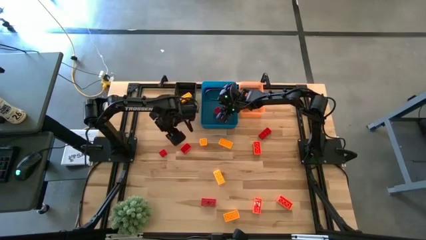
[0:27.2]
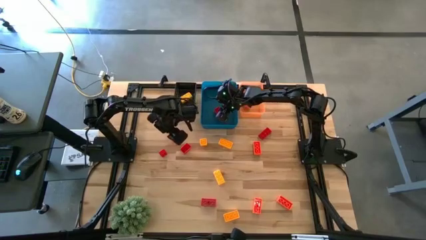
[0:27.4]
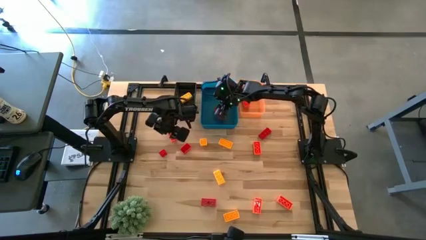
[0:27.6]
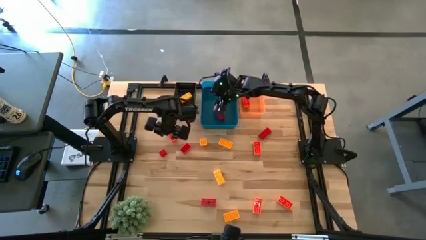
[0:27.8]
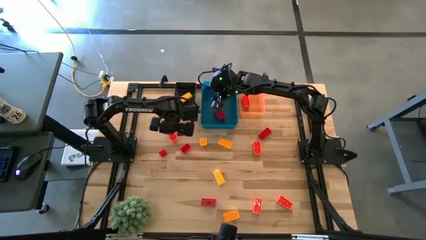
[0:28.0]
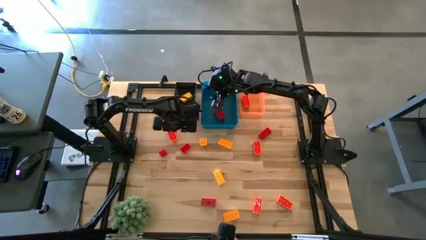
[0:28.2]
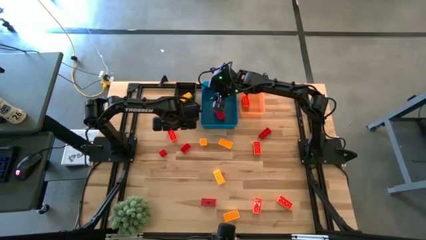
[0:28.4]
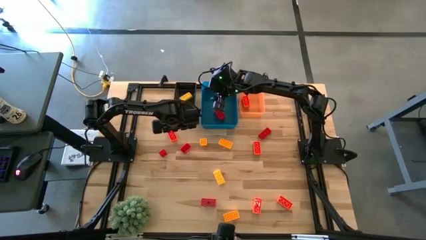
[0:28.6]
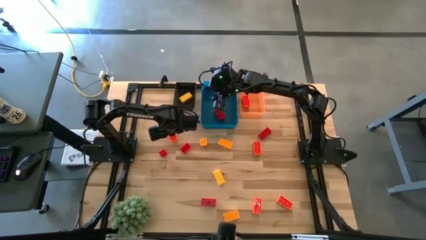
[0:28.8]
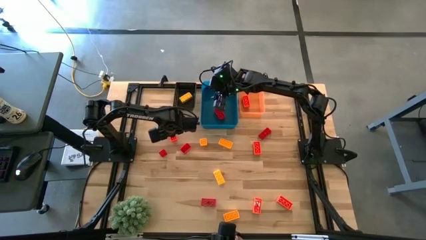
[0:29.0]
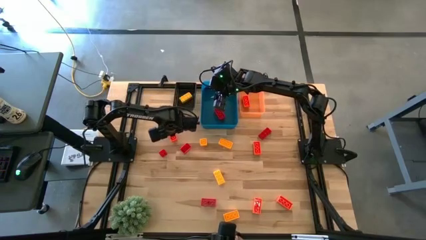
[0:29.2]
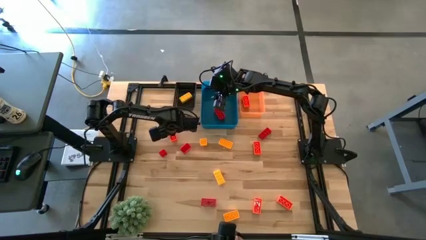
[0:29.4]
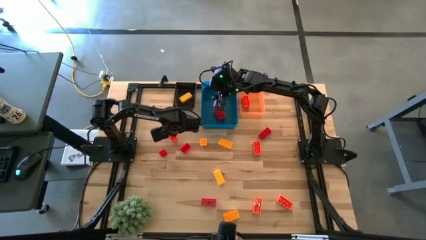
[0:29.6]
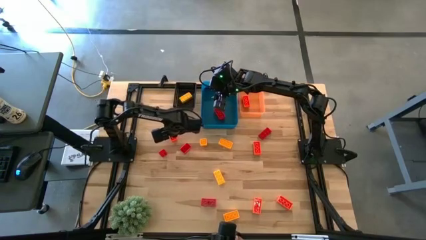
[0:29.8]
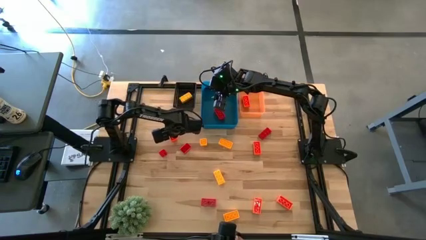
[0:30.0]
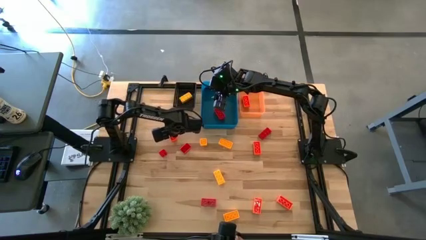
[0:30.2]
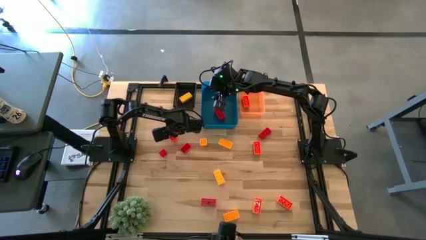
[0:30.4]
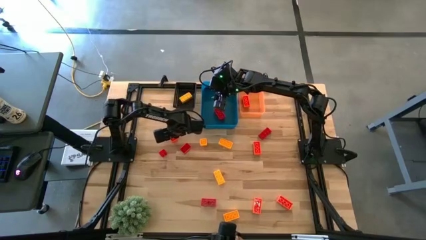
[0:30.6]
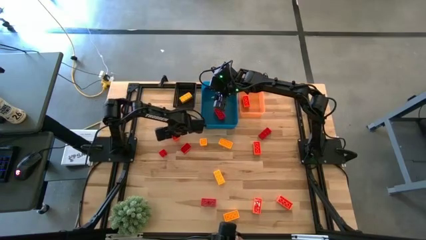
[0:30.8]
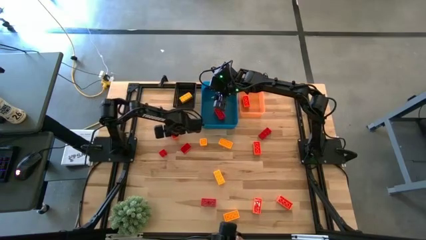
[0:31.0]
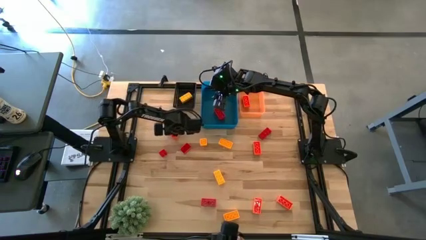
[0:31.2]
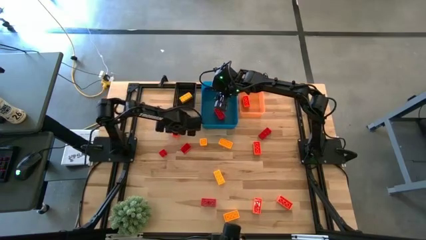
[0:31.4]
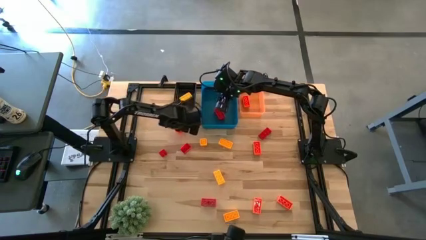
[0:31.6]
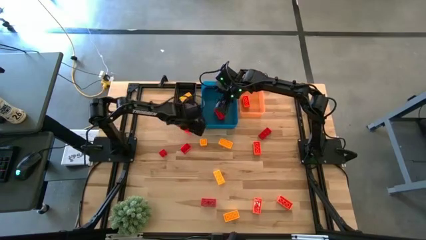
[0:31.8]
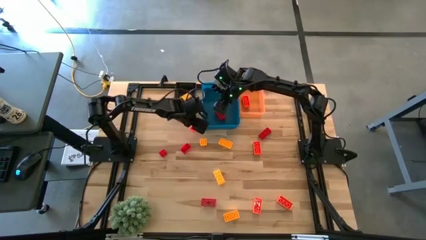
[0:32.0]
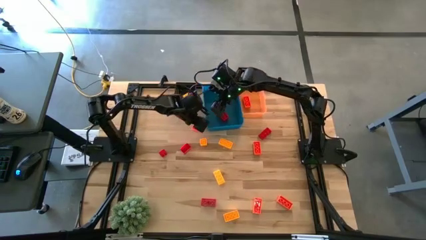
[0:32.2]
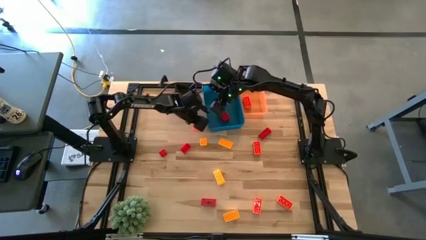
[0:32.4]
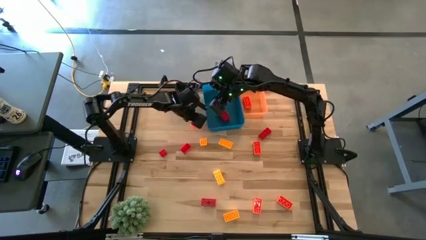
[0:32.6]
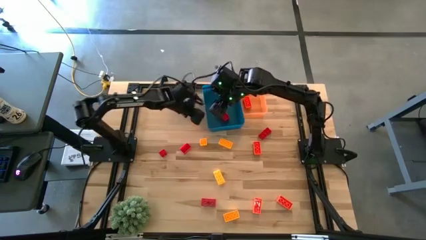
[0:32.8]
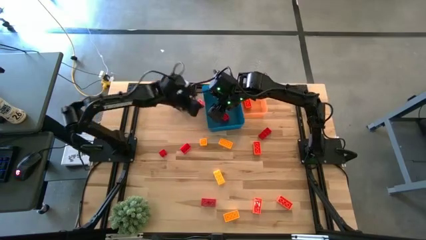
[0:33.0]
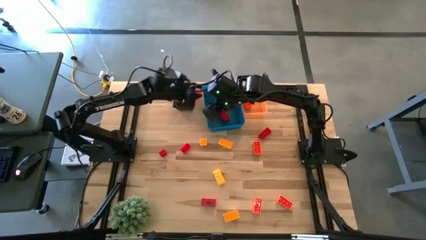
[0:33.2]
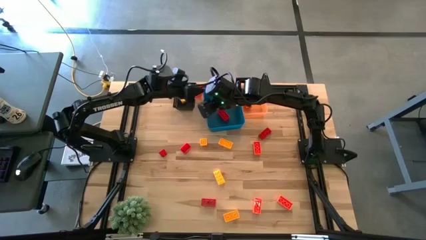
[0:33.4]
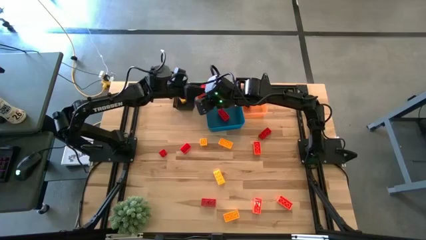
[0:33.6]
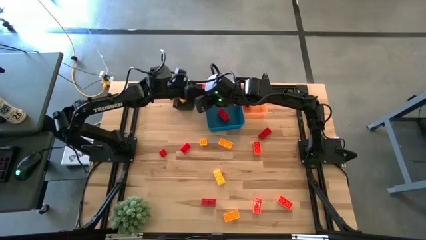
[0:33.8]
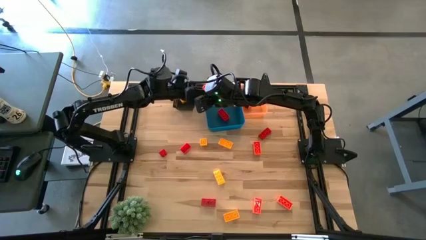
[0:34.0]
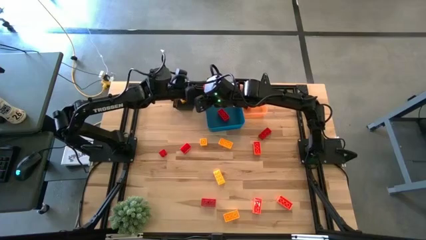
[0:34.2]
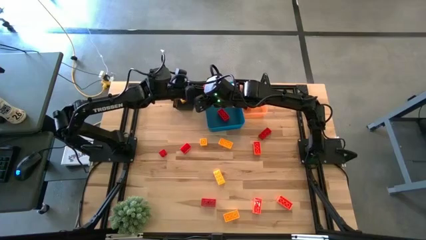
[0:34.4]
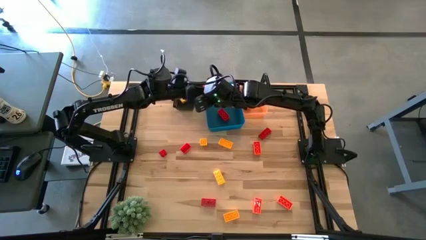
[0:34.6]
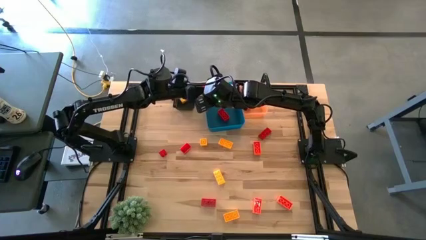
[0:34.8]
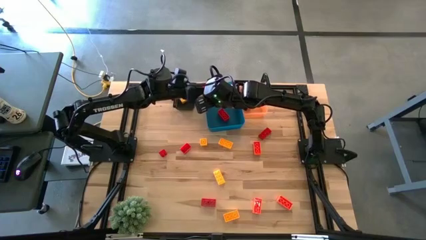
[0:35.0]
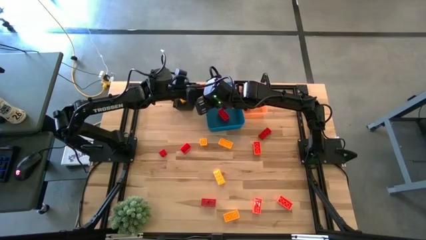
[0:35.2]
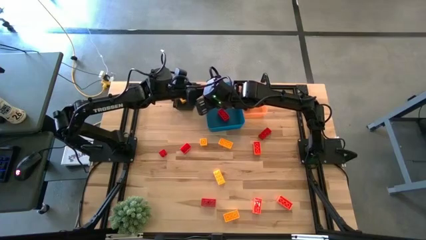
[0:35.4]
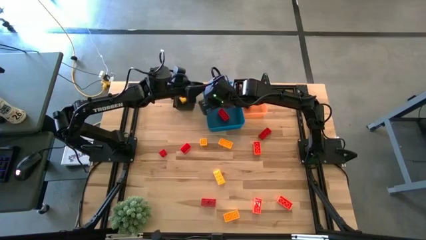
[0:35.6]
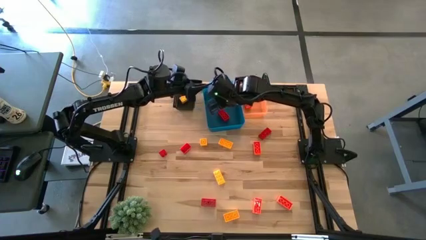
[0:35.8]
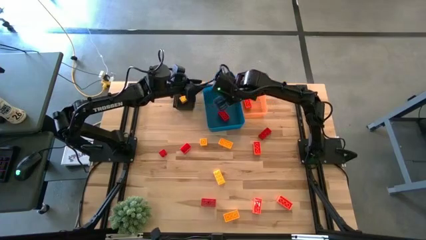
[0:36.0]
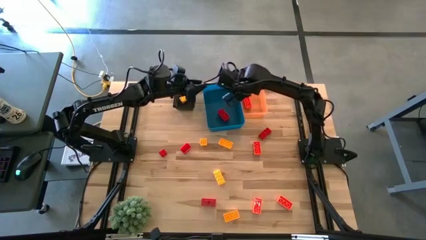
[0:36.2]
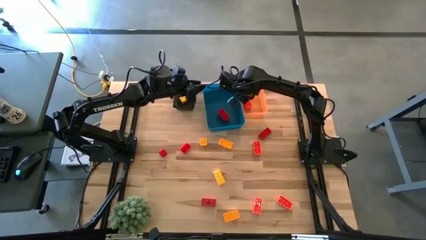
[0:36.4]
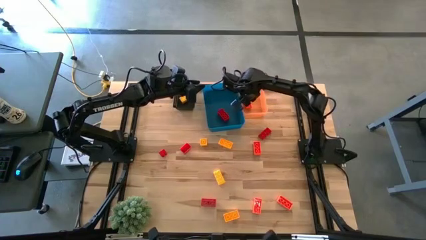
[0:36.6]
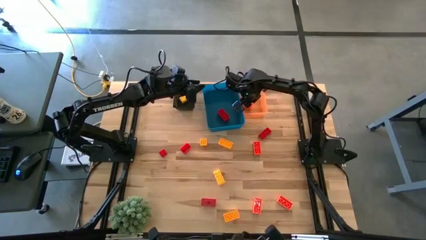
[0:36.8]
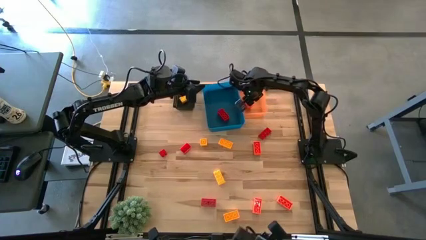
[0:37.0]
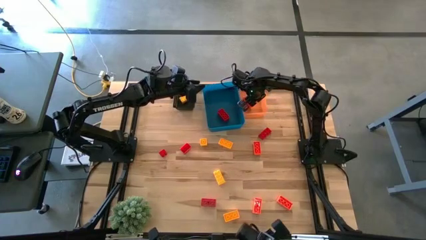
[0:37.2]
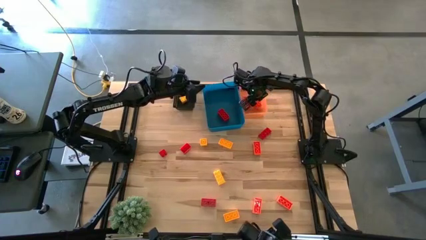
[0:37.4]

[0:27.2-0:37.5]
Task: Sort & place blocks by color
Put the orange game piece into the orange bin

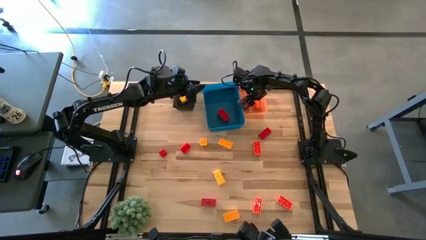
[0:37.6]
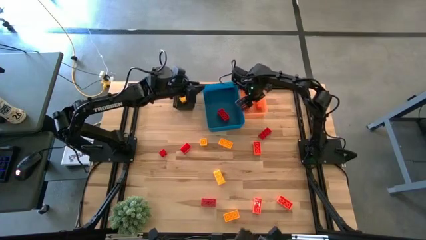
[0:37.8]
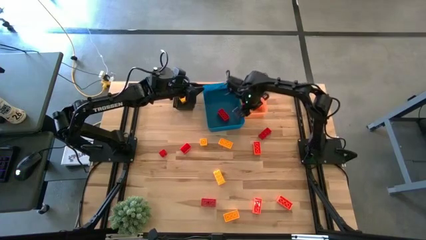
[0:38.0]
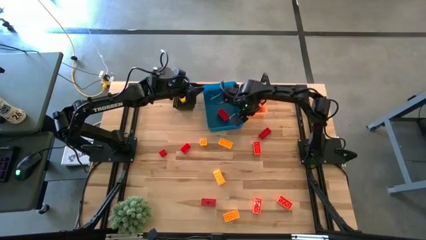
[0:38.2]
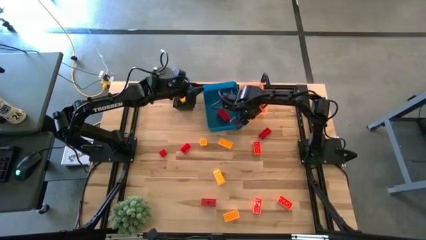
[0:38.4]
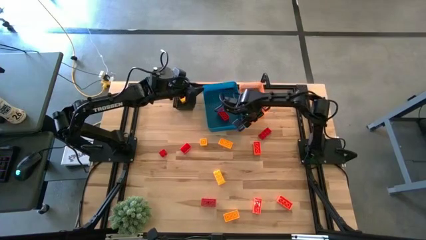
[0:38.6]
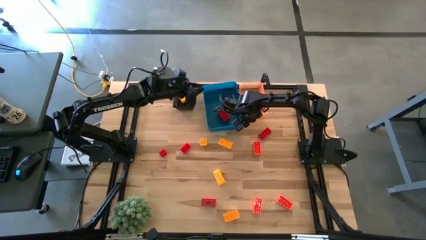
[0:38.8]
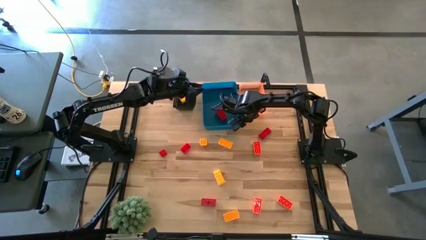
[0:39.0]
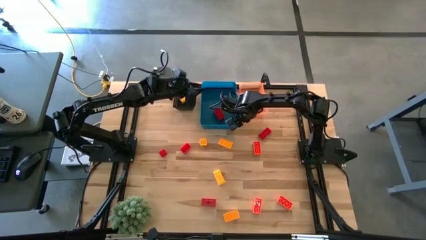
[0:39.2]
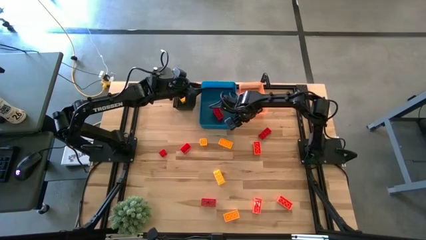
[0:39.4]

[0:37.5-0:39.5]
Adjust the blue bin on the table
